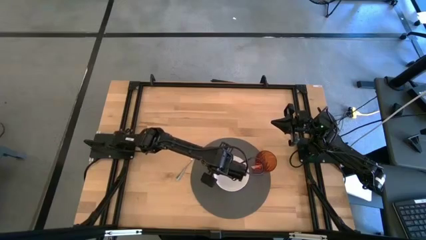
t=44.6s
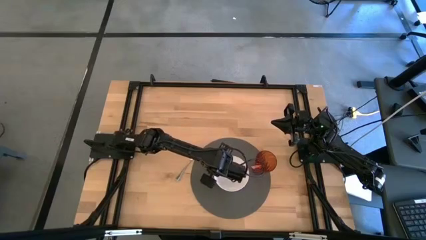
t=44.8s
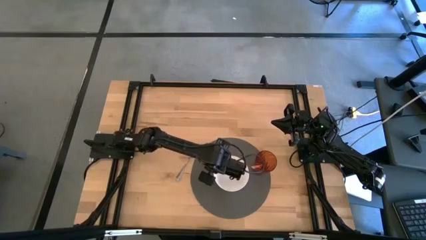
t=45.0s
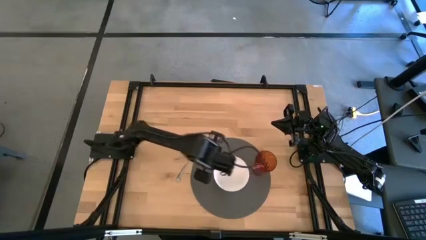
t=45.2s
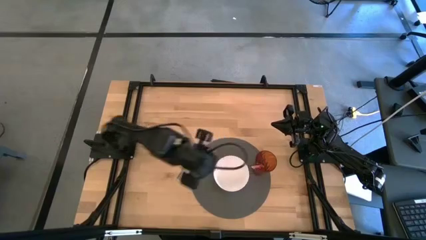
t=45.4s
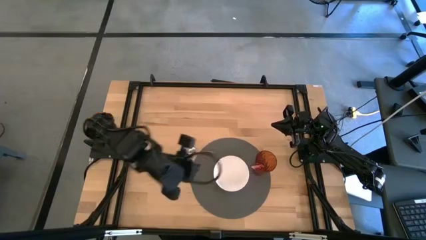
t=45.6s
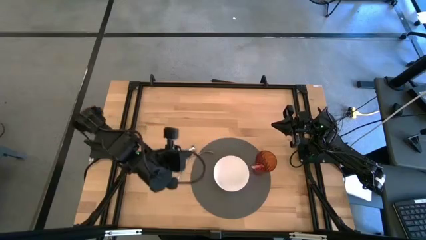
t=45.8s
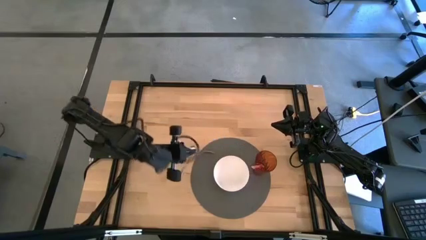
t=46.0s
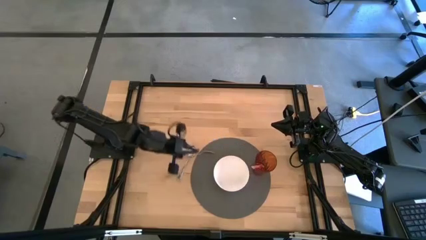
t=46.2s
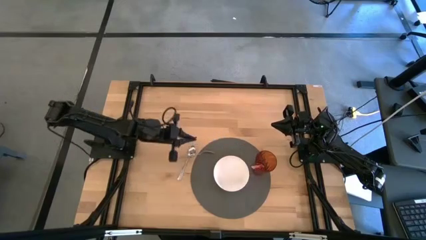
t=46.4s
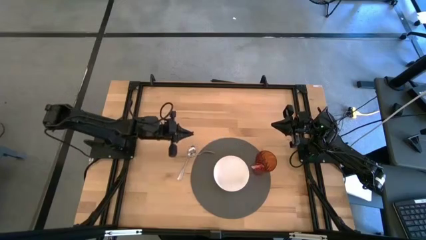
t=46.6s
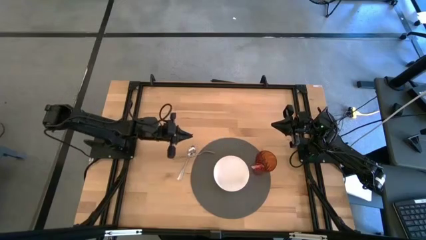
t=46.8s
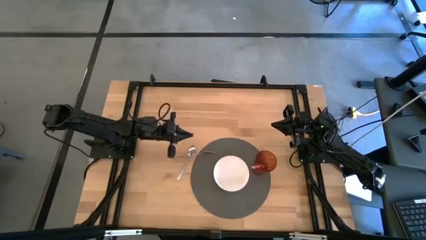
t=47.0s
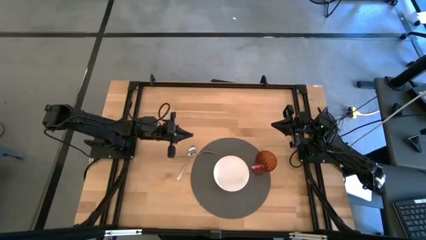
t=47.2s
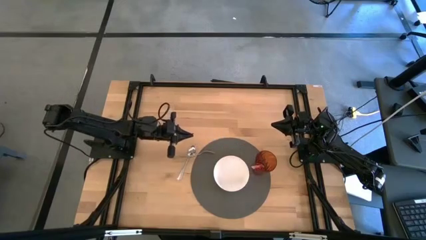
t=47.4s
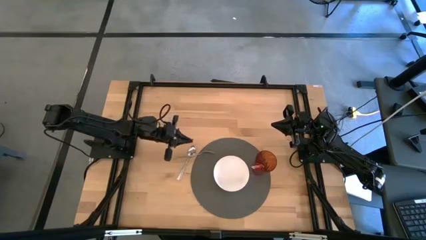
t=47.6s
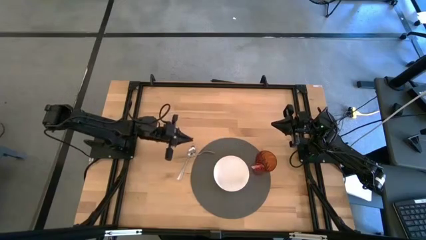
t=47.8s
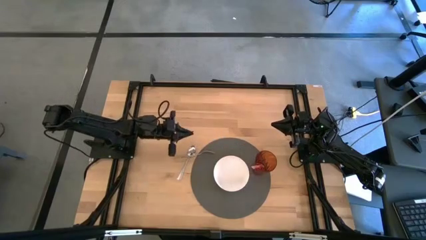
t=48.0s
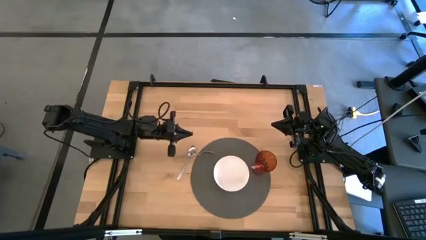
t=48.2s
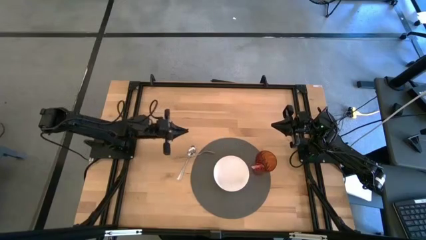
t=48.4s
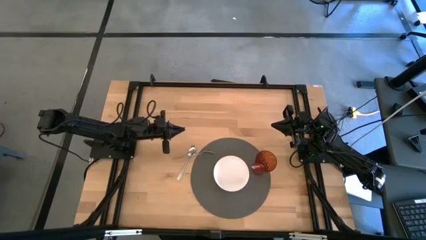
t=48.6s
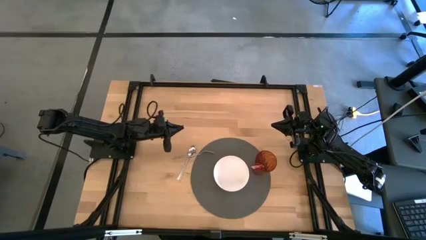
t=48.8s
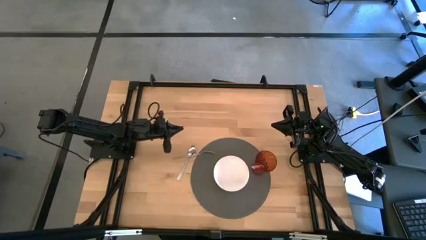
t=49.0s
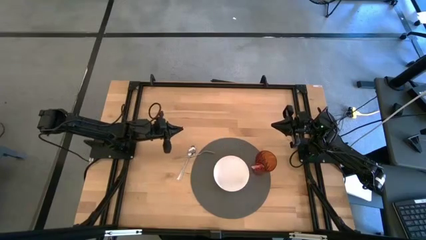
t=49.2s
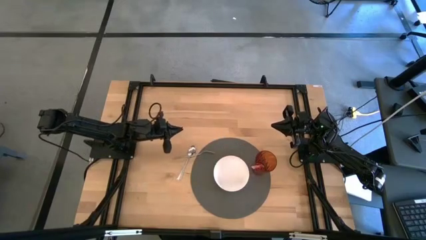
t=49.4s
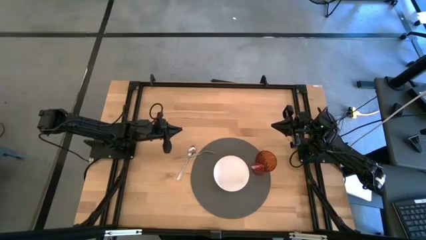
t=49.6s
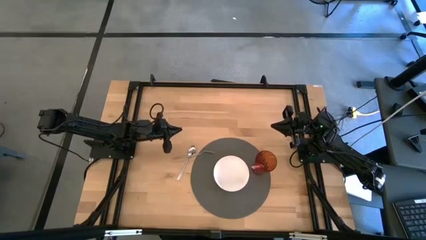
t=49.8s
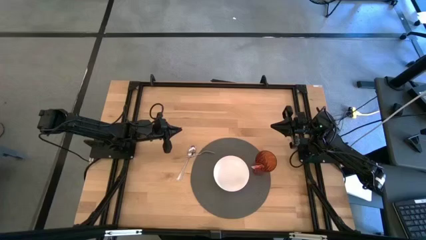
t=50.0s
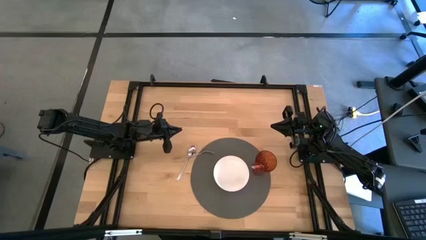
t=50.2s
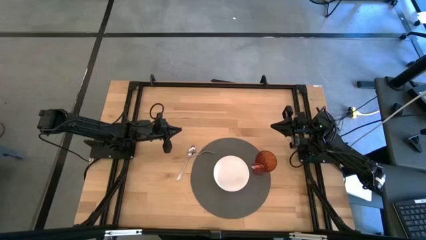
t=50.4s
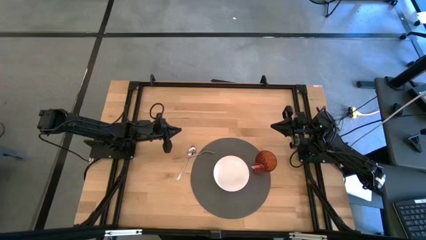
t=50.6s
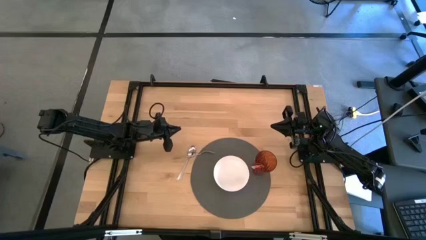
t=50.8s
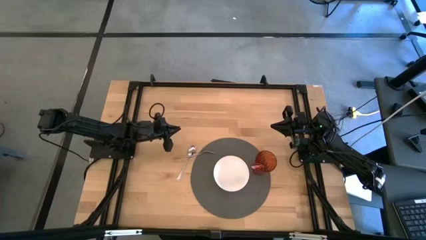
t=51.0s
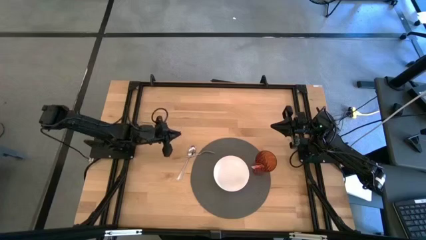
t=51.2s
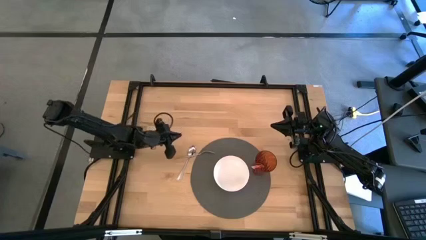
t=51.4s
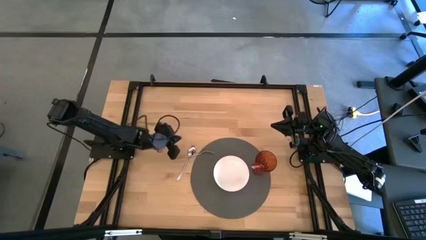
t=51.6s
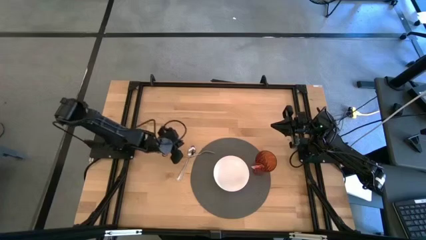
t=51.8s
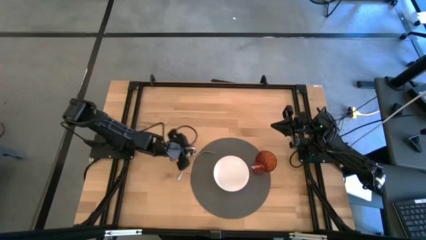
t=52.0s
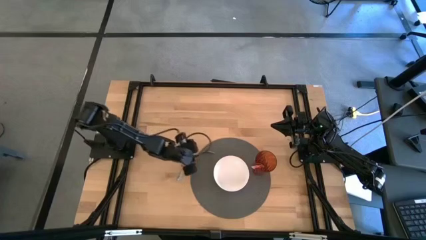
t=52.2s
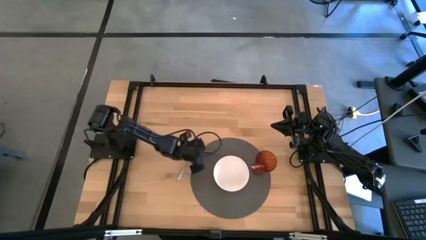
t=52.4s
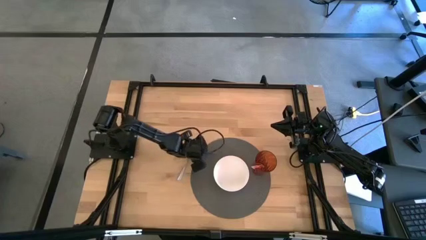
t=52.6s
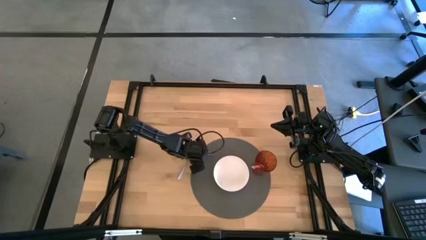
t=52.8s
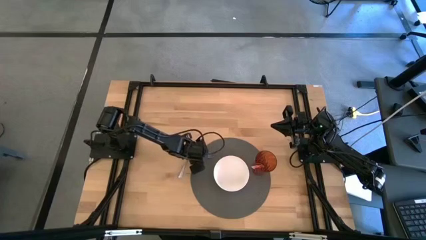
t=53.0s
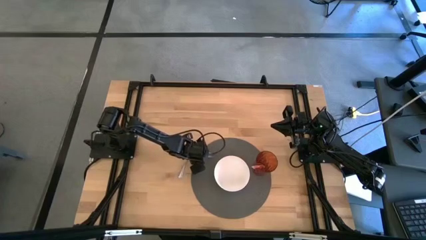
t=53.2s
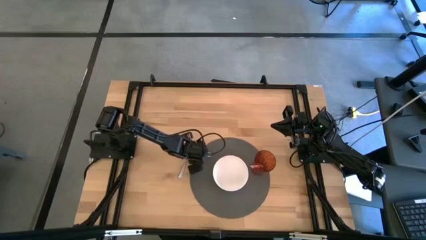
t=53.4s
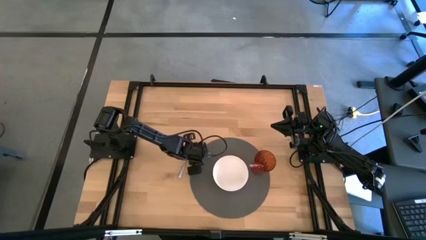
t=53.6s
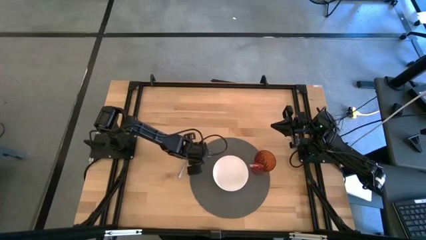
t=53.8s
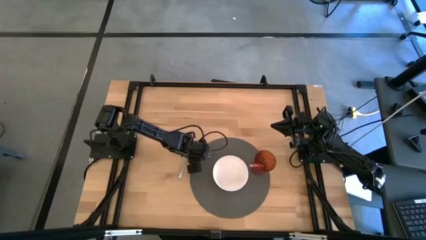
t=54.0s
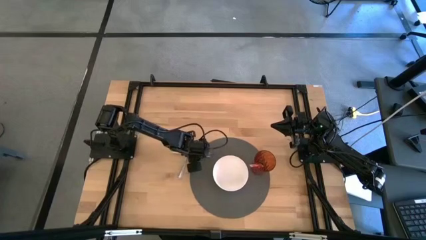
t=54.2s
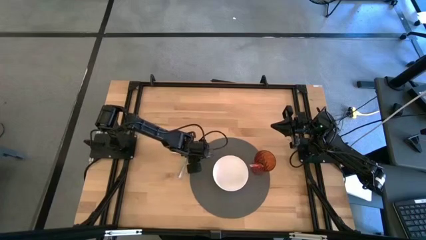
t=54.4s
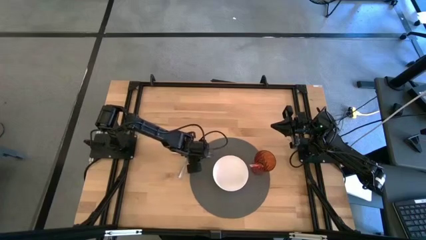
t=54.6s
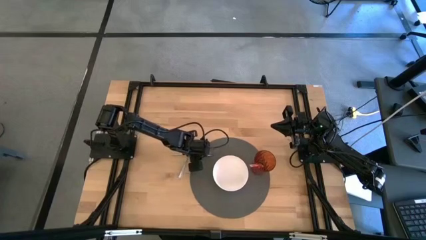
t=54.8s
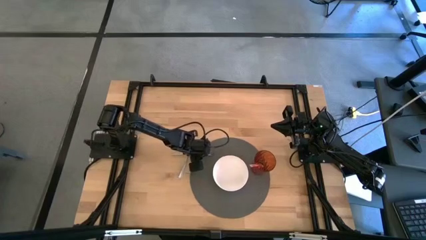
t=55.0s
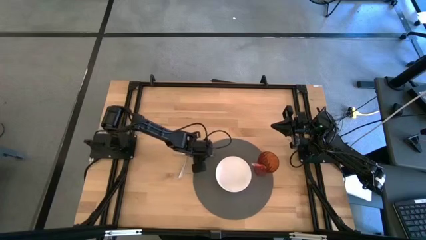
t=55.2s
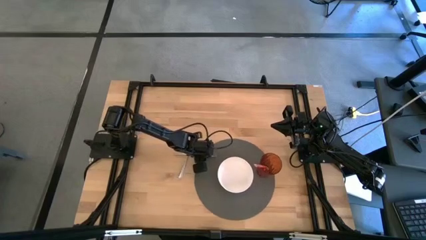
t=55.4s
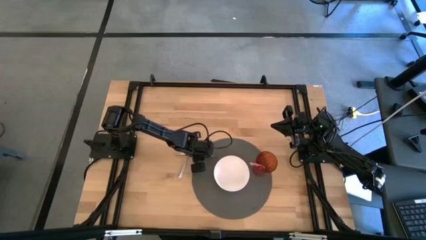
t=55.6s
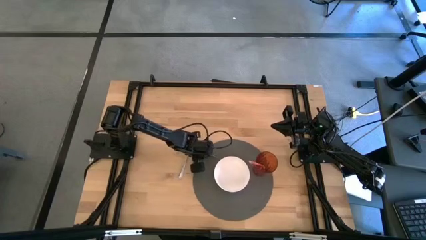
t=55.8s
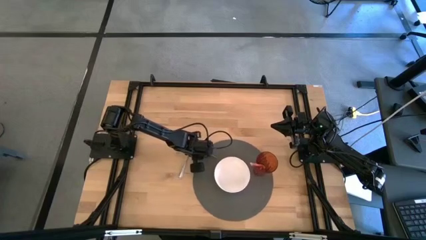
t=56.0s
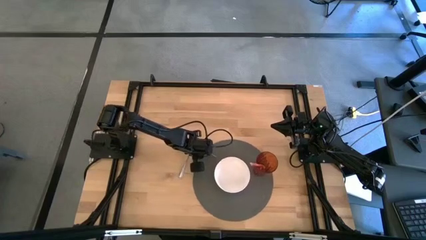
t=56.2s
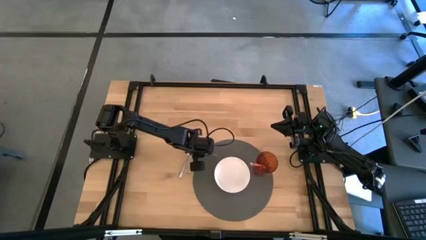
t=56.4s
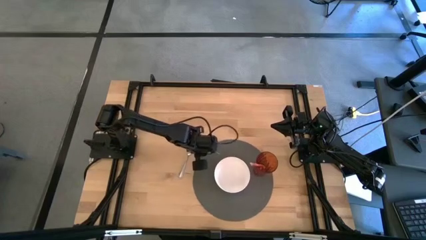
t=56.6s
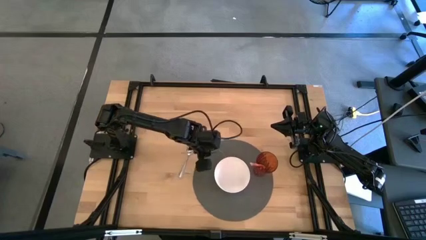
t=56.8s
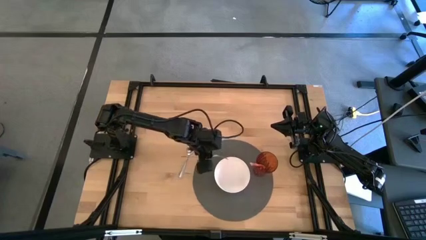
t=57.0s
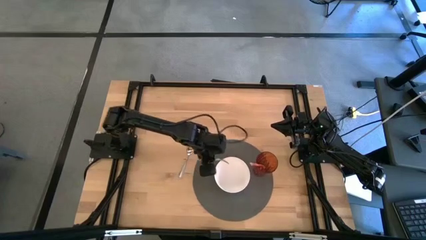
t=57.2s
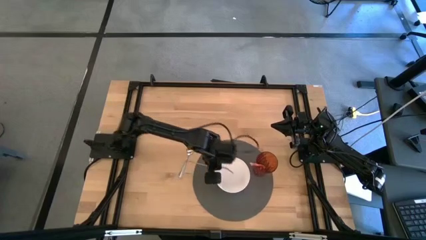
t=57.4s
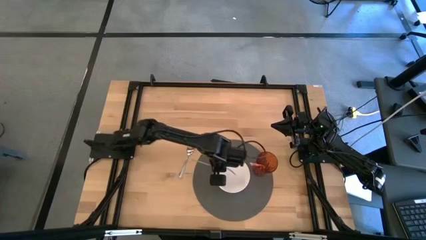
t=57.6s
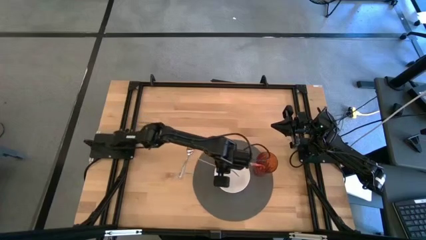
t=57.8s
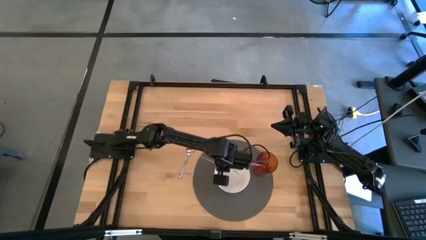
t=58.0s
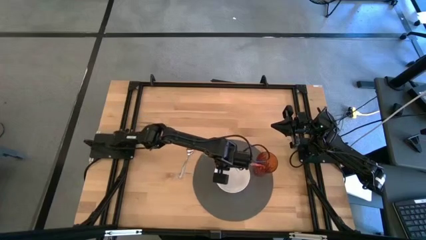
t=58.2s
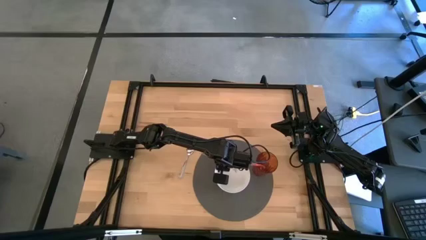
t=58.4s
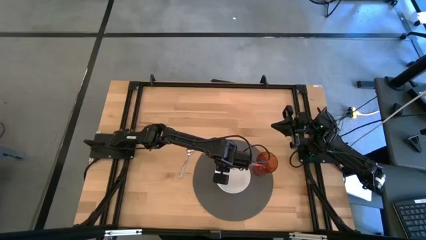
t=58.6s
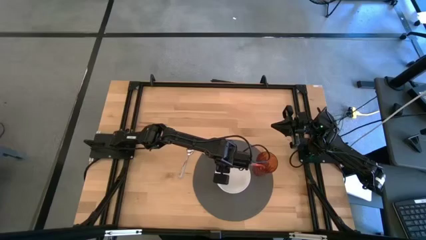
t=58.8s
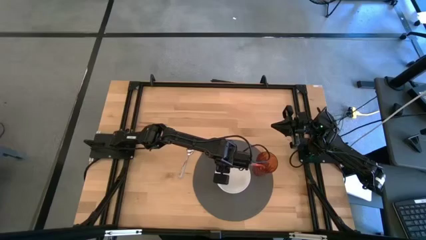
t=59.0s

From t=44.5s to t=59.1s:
Task: Pick & Place Utensil
Put the silver fork into the white bowl

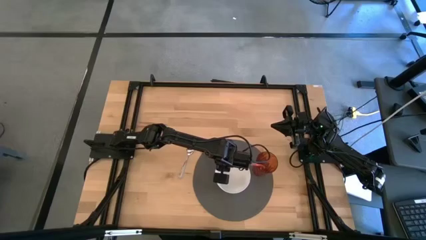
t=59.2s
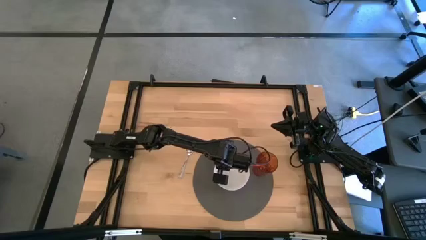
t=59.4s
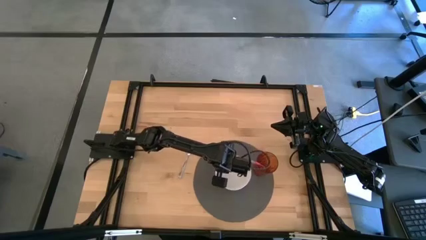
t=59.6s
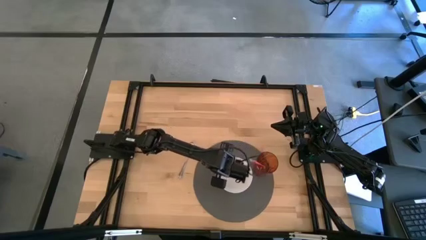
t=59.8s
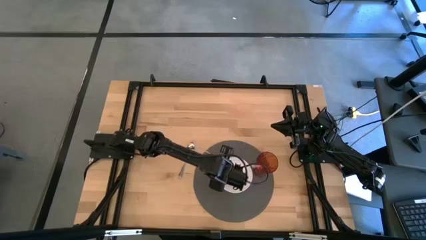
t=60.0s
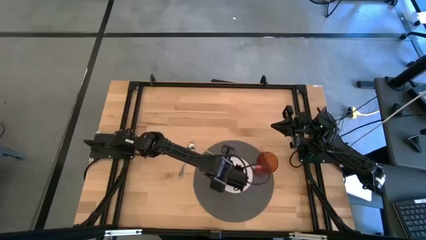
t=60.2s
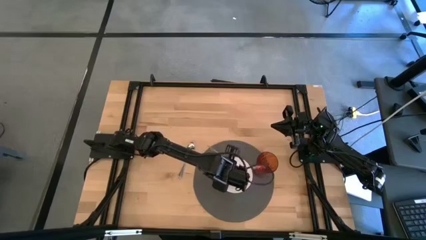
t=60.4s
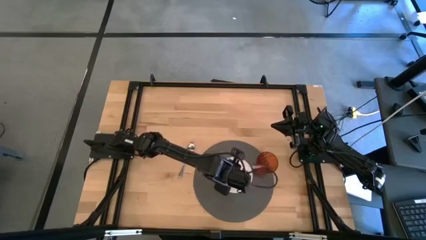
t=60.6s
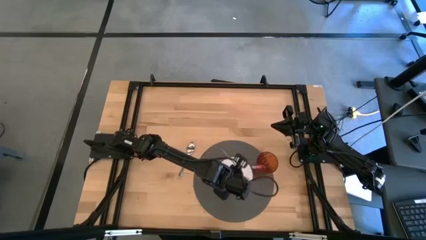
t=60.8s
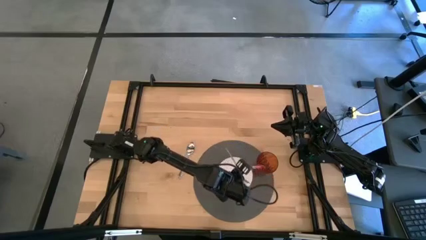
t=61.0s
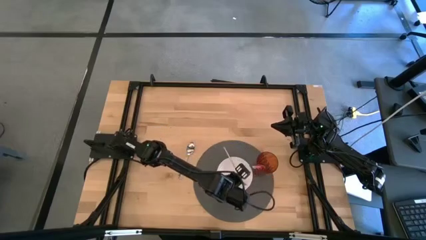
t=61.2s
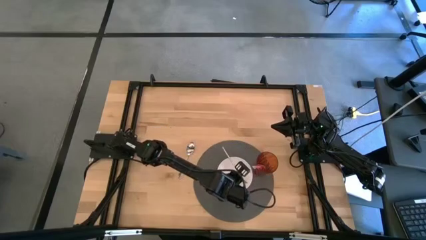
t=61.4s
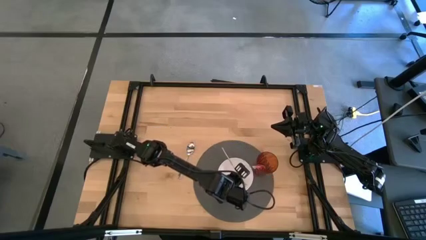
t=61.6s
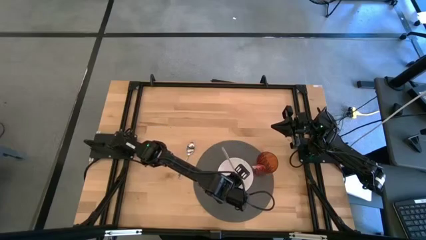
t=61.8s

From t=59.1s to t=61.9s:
Put the silver fork into the white bowl
